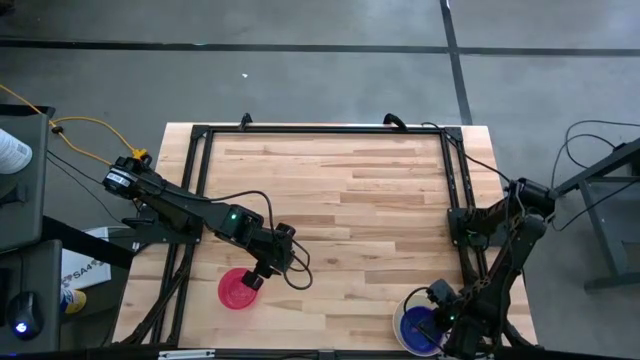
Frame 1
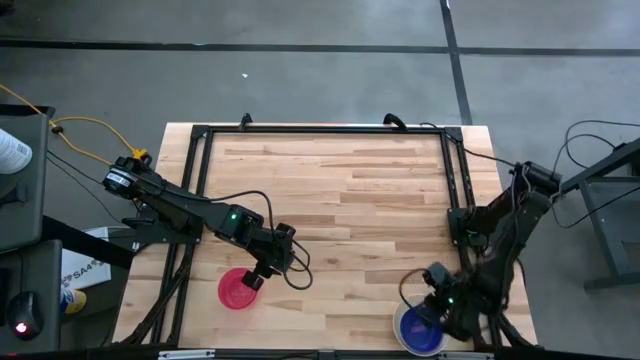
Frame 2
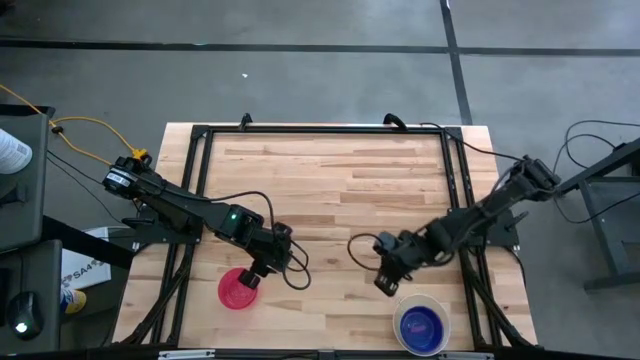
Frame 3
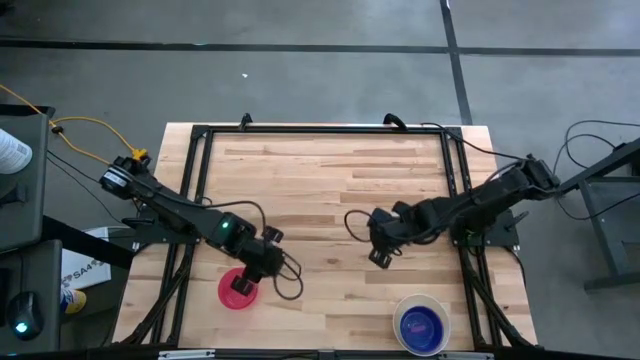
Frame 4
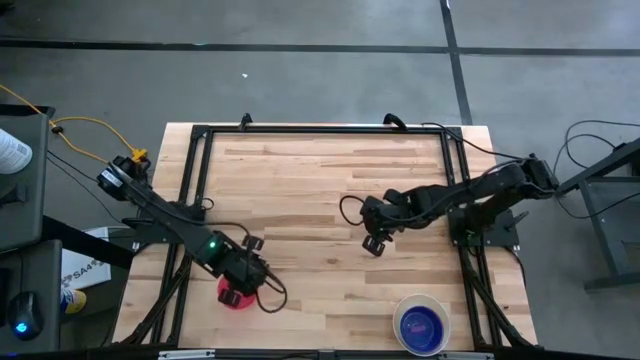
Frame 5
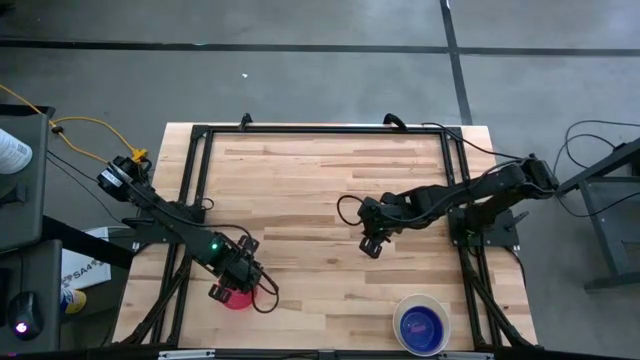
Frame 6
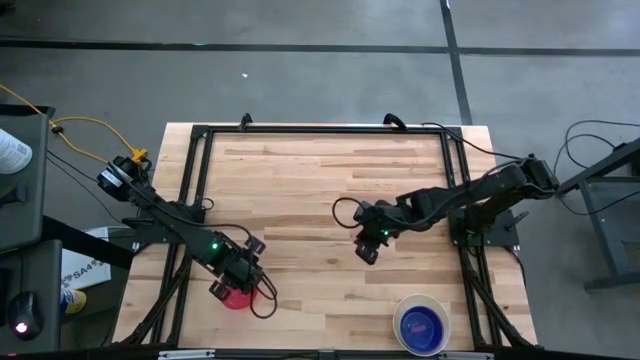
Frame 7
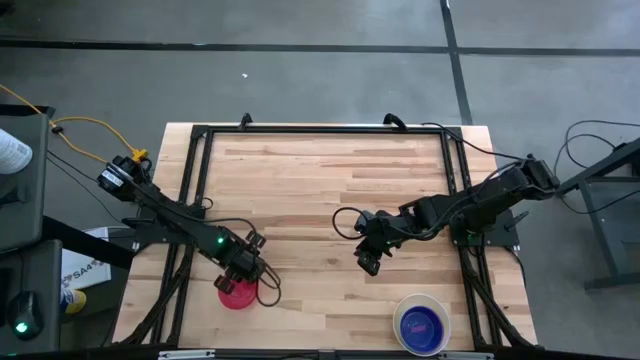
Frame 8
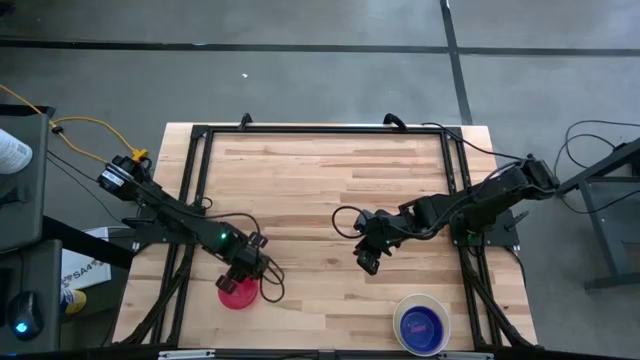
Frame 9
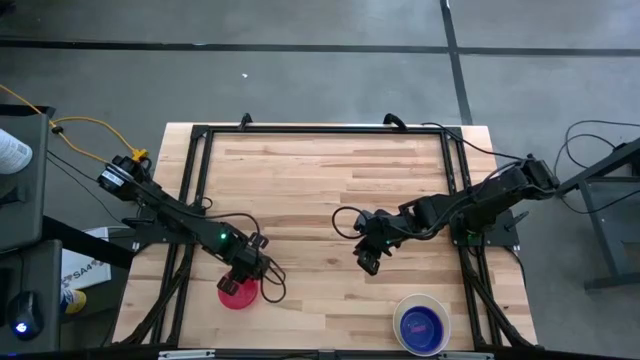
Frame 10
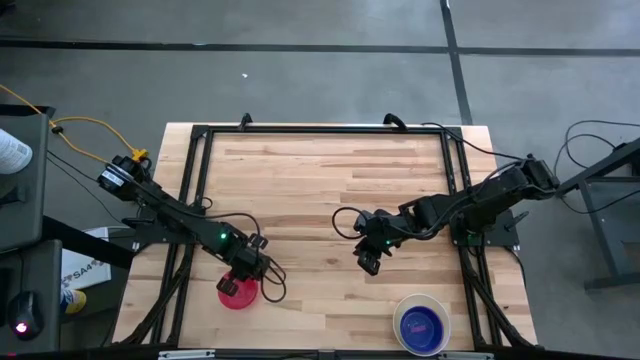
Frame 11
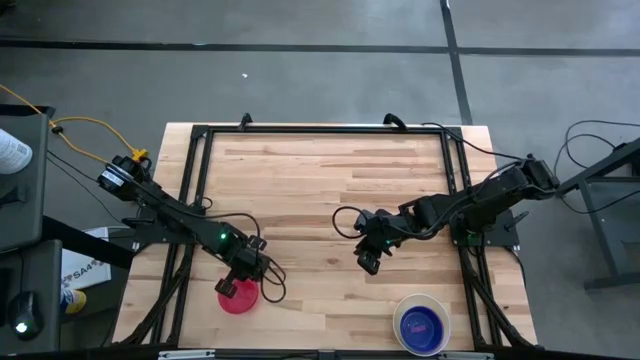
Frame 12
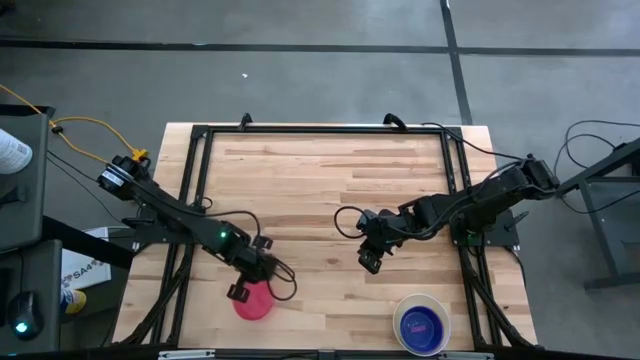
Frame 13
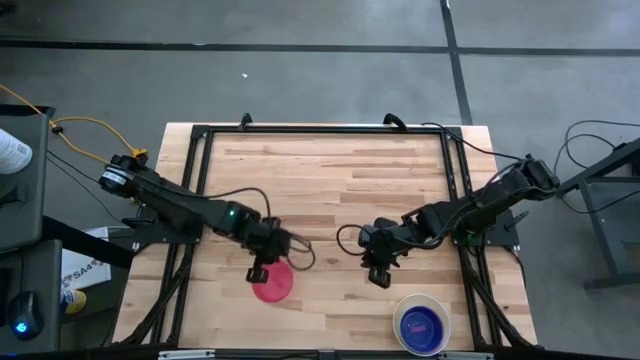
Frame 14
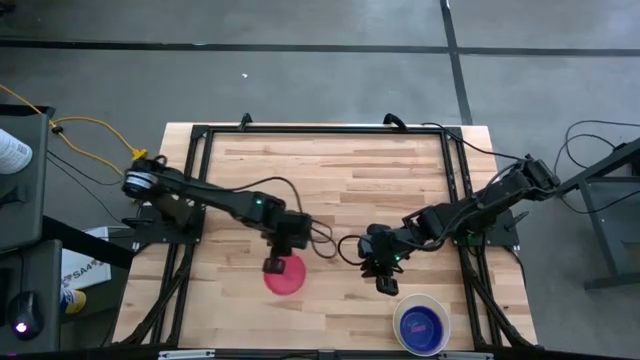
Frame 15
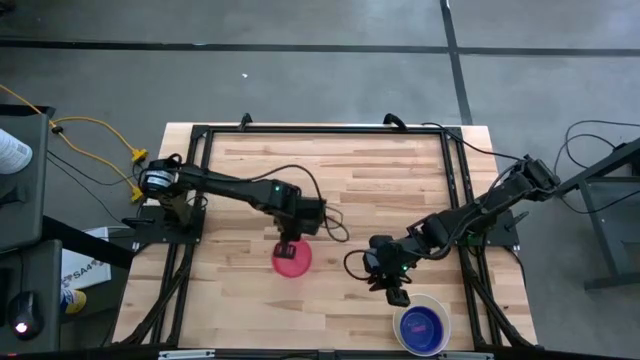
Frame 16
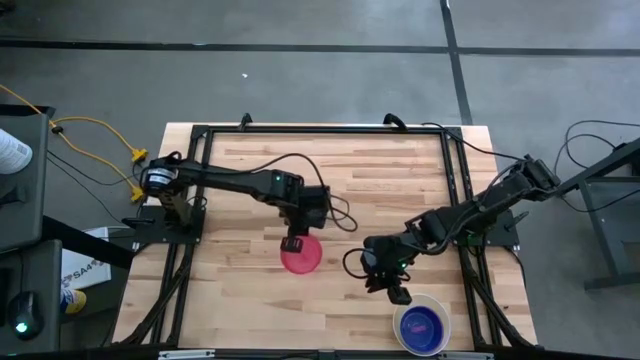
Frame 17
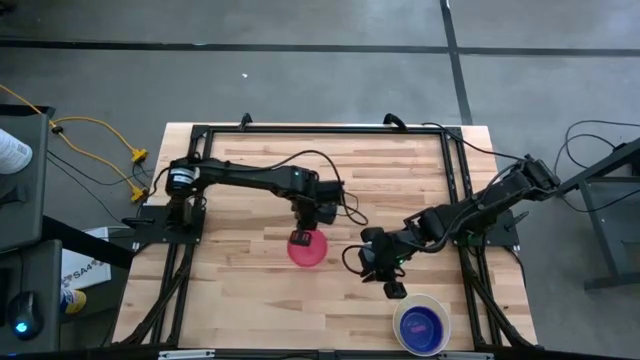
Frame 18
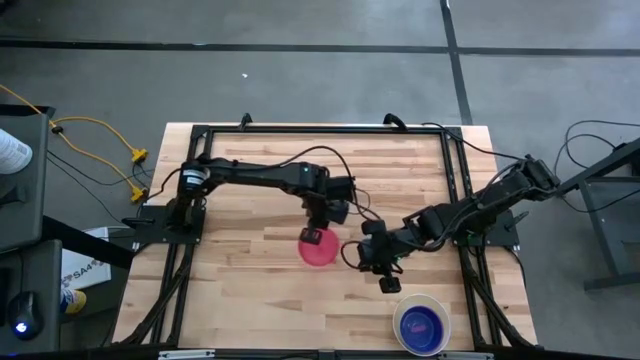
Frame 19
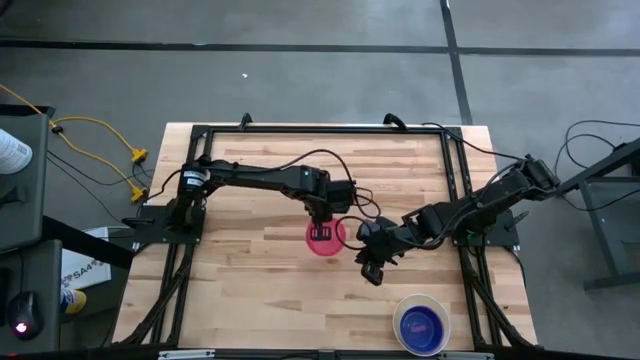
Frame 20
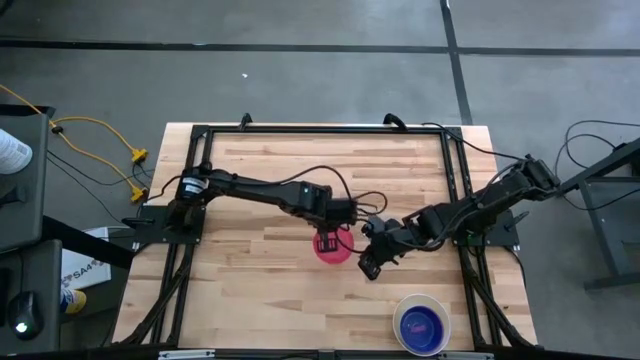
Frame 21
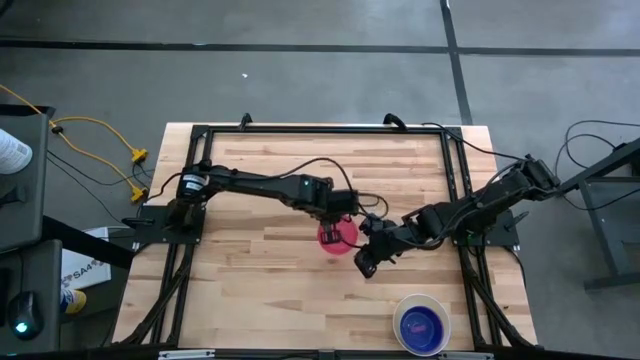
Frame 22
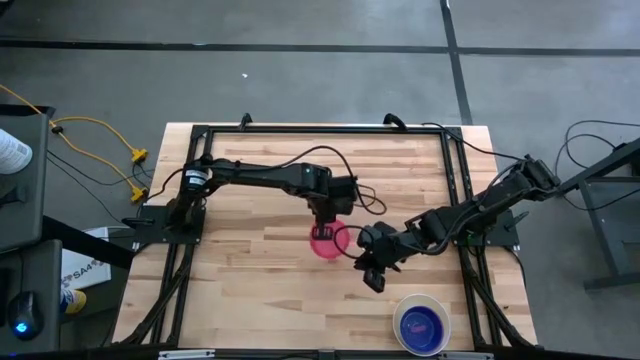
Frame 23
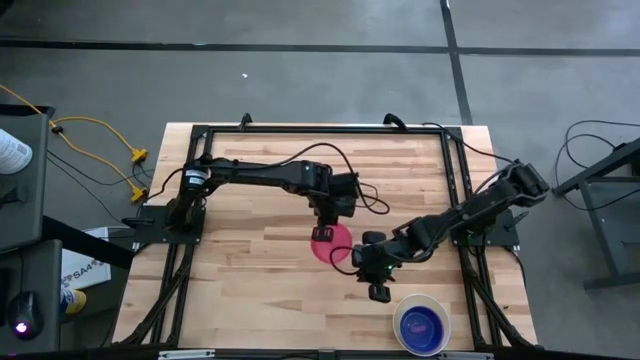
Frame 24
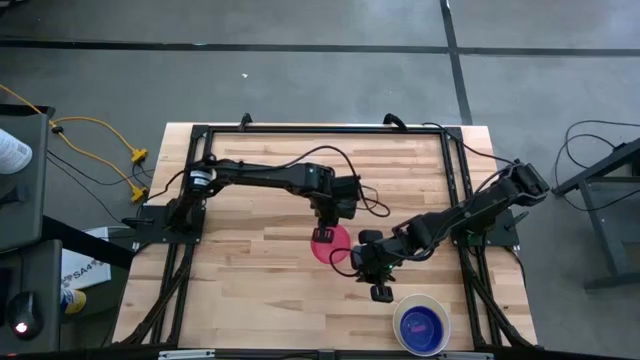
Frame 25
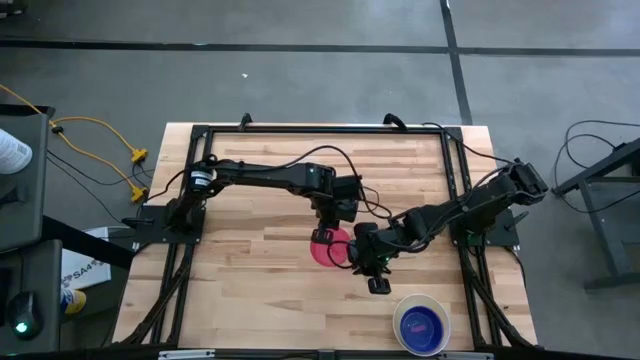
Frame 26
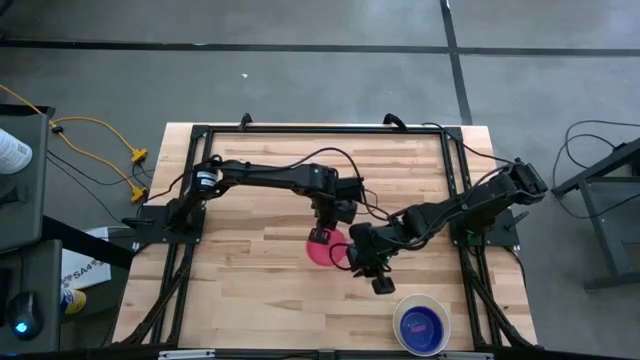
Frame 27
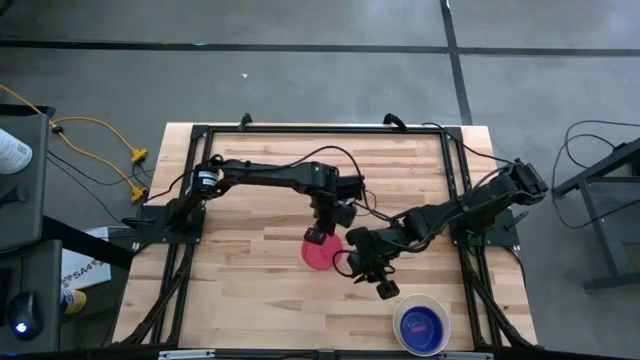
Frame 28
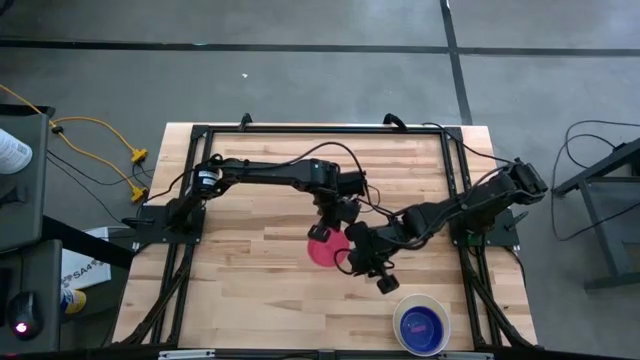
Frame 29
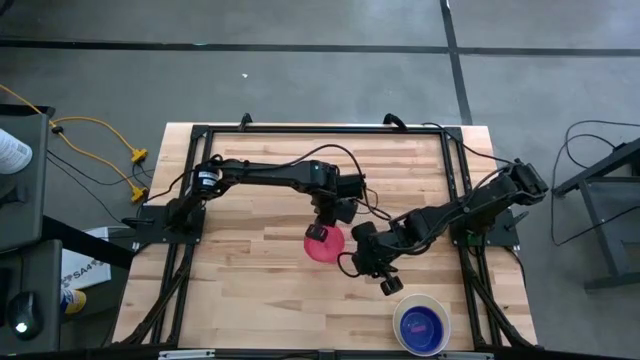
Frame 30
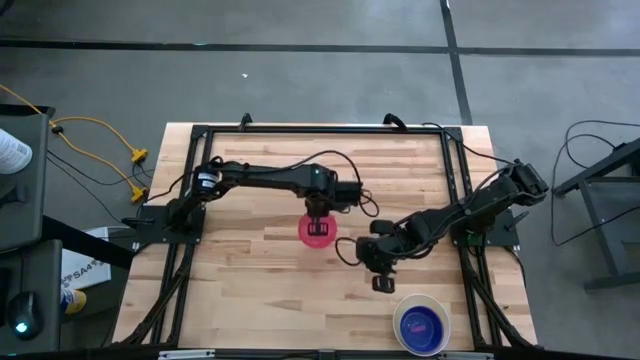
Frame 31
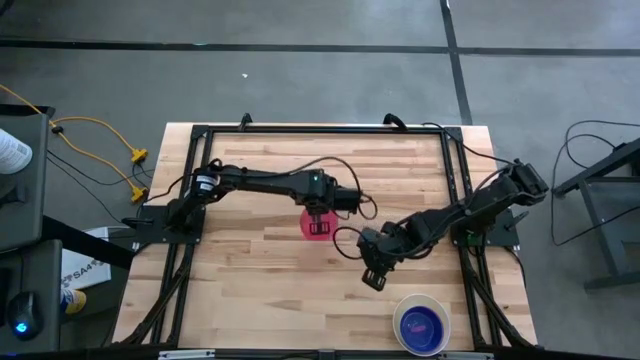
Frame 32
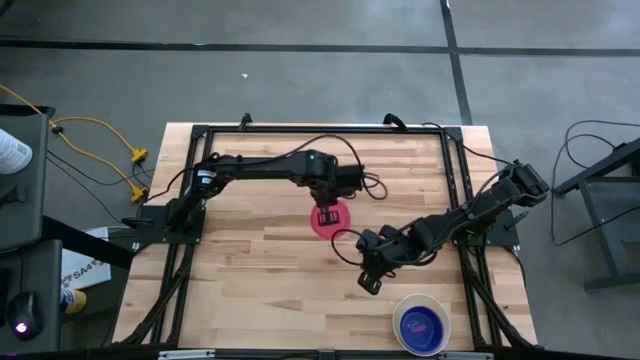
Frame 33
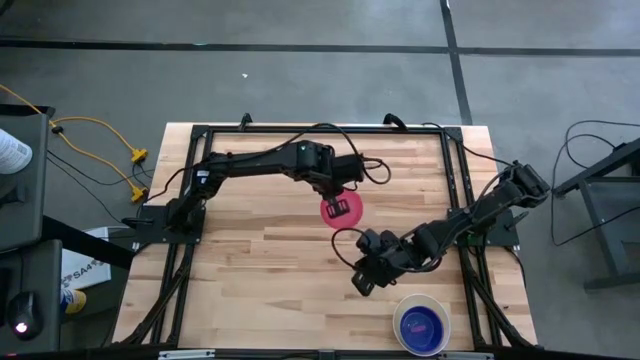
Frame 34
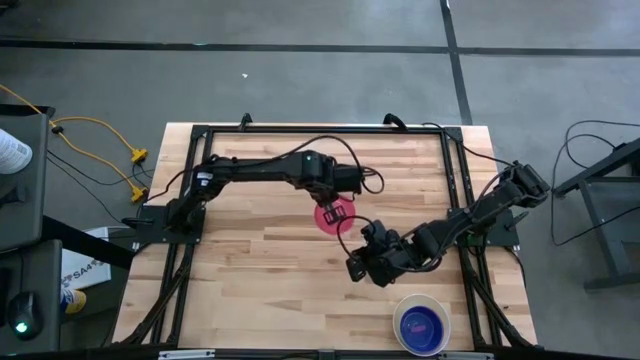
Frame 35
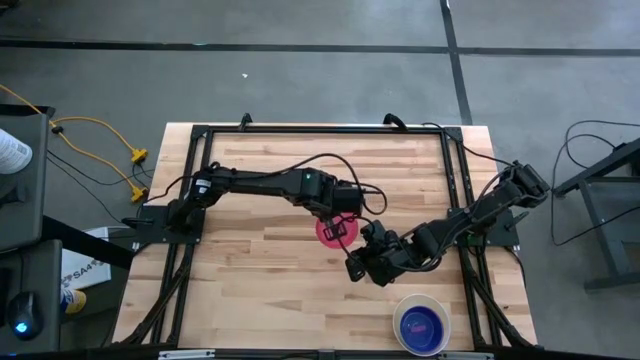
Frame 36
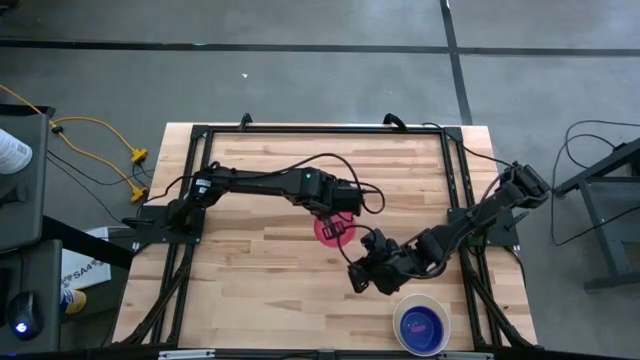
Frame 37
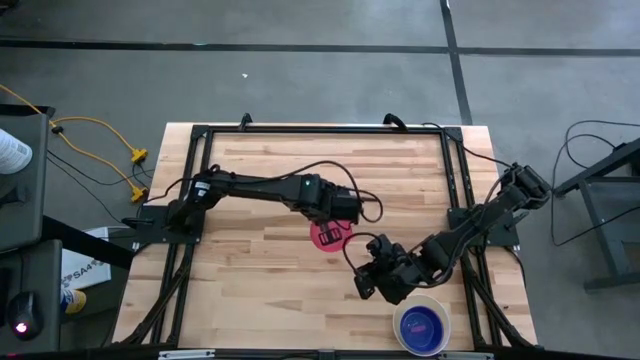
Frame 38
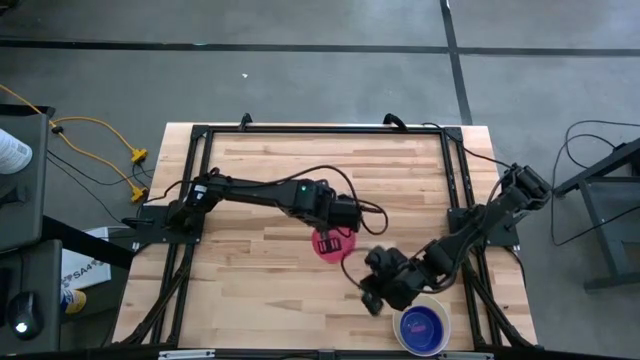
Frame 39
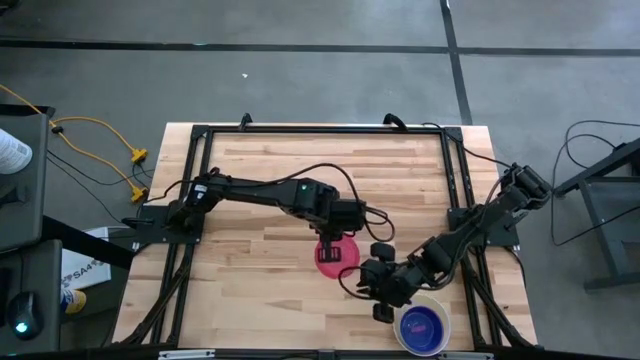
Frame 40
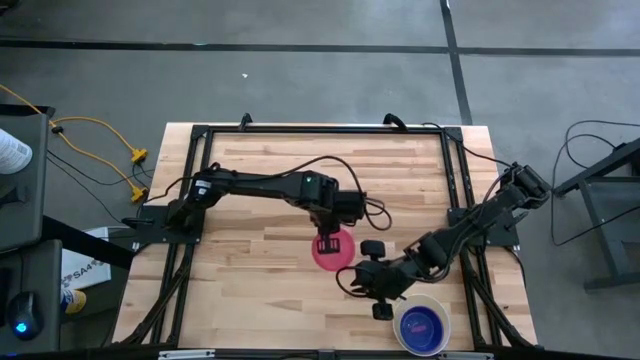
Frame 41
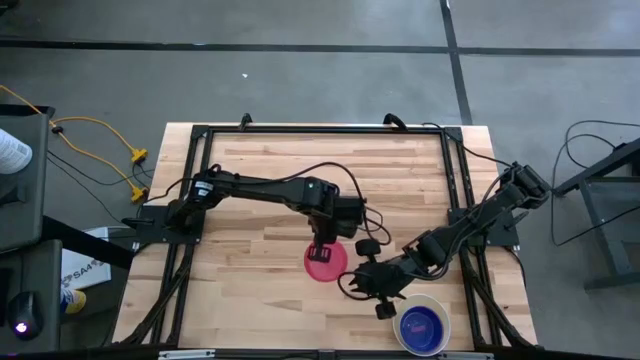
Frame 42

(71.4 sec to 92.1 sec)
Stack the red bowl on the purple bowl
